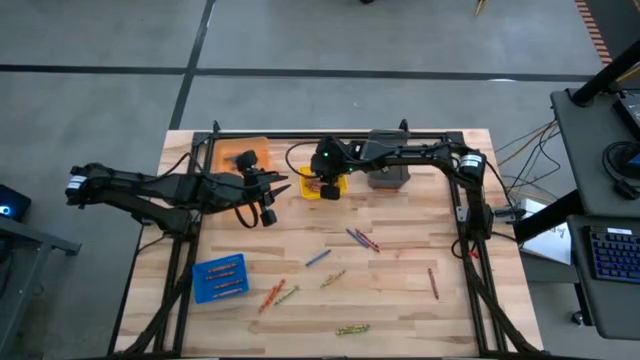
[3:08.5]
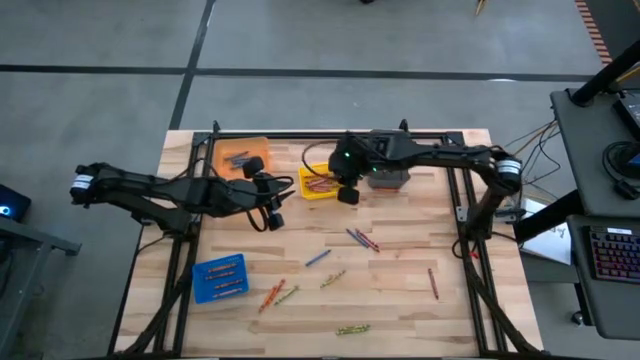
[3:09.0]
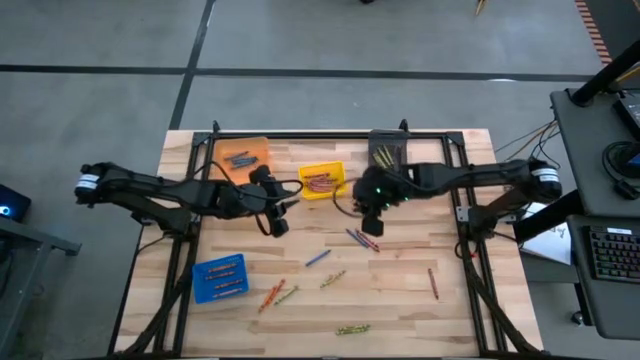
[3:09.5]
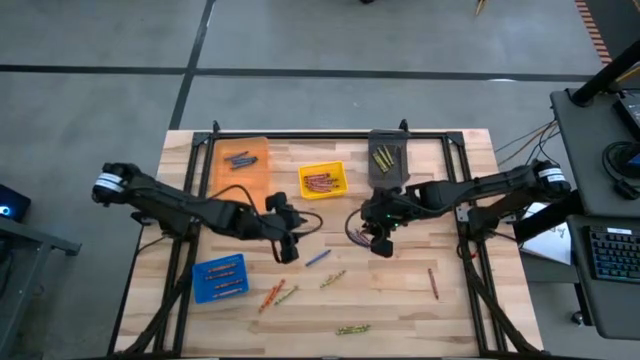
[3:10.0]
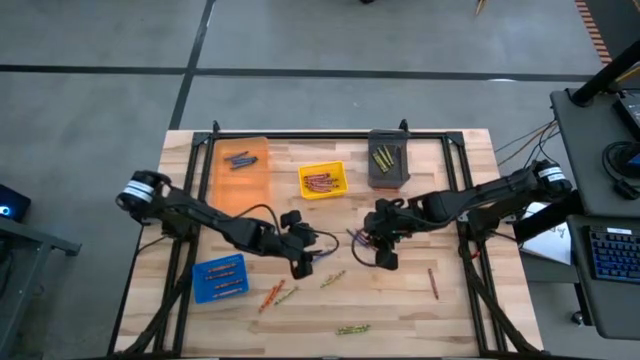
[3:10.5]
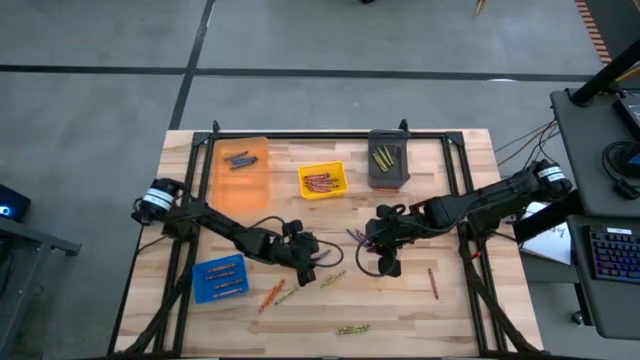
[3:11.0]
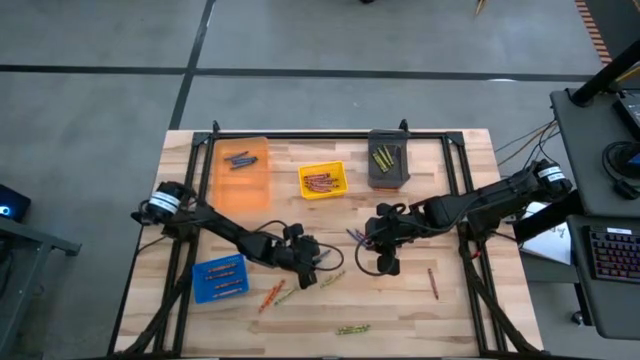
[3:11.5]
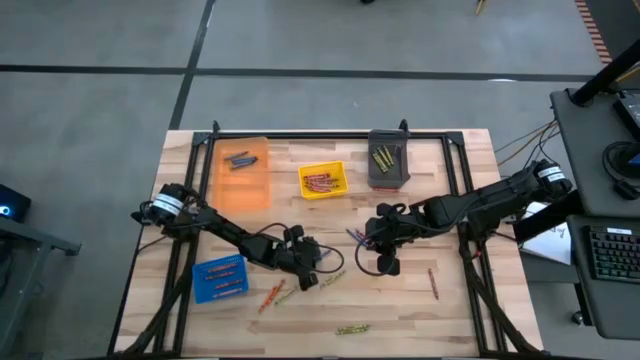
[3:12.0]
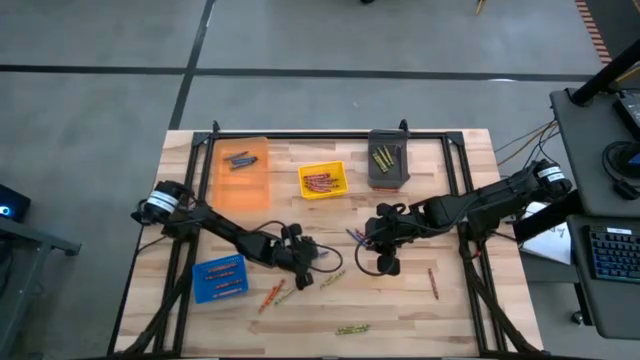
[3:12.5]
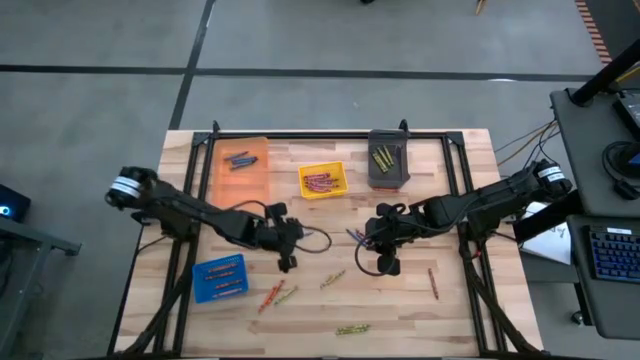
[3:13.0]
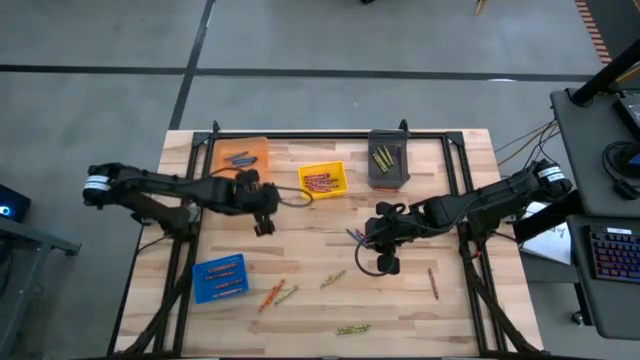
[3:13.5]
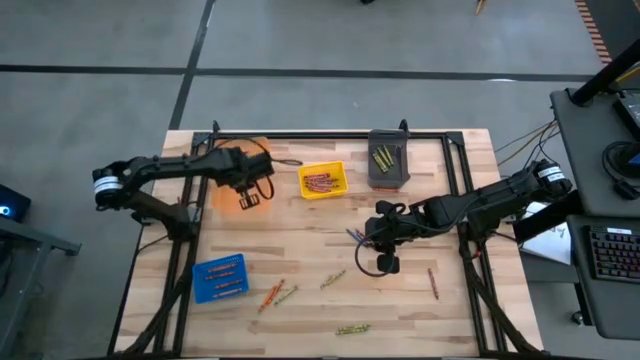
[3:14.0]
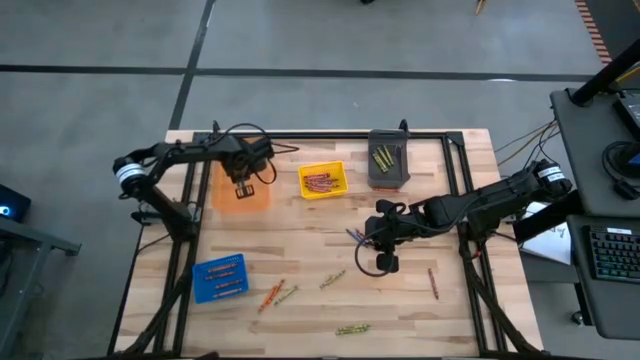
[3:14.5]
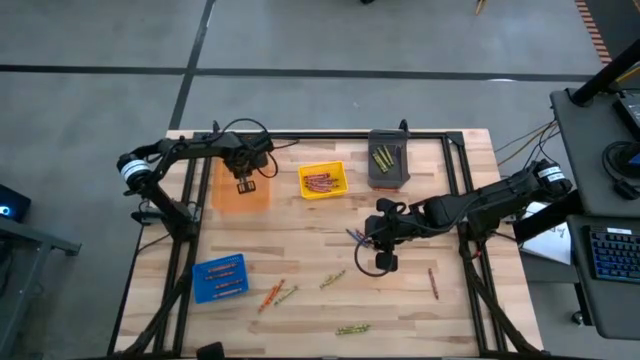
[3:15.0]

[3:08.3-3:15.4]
Task: Sort crayons
Put the blue crayon into the orange bin

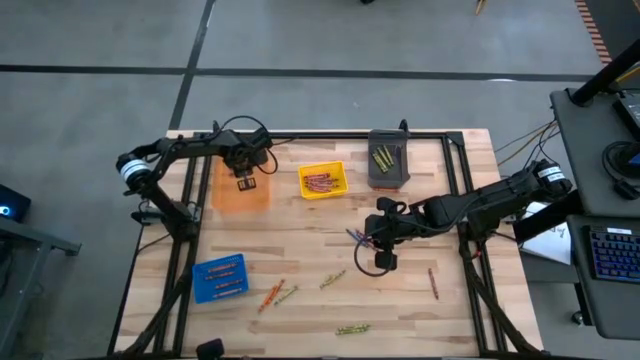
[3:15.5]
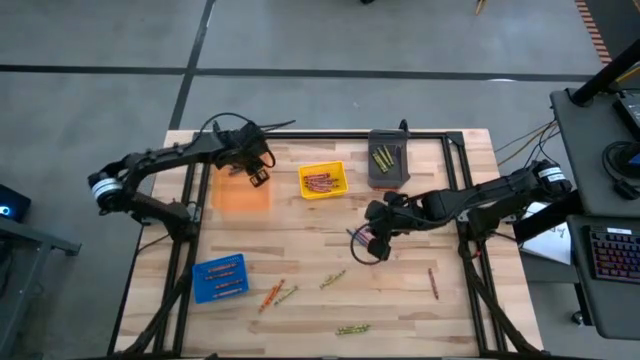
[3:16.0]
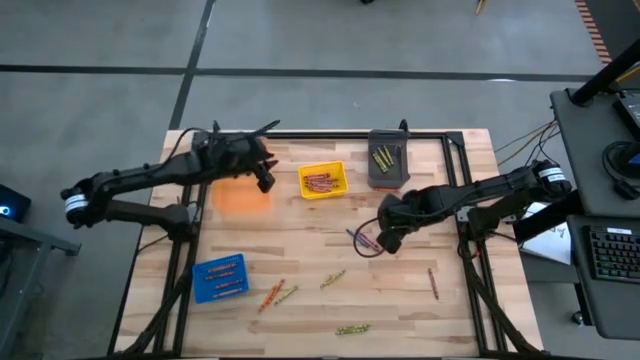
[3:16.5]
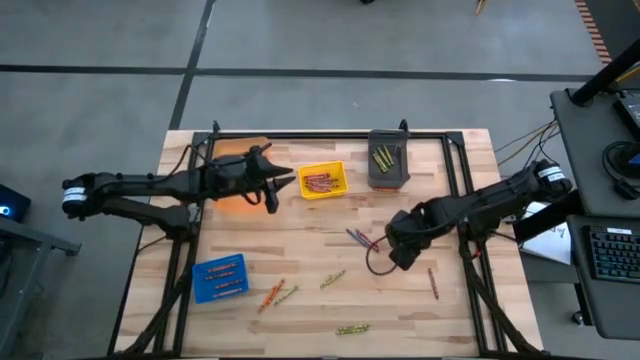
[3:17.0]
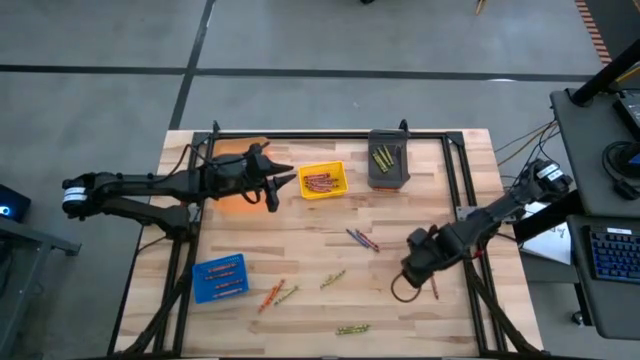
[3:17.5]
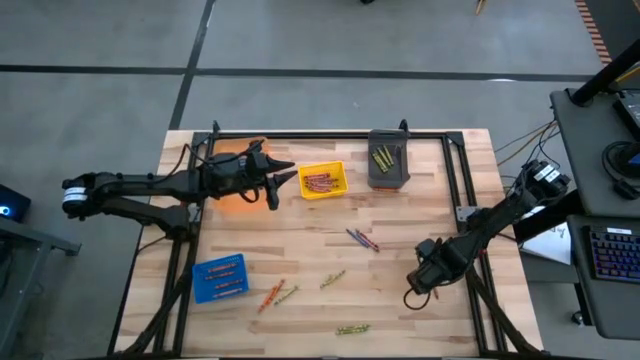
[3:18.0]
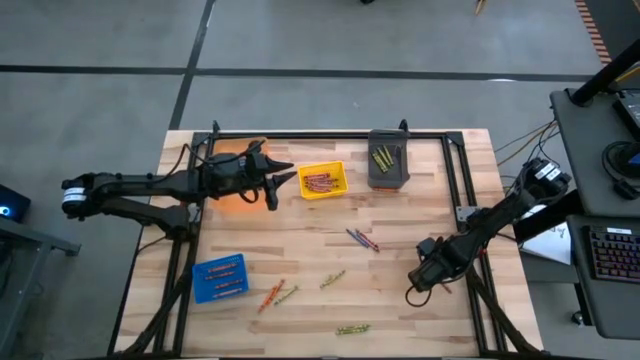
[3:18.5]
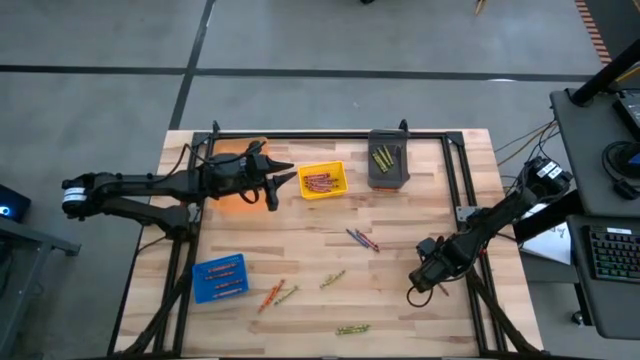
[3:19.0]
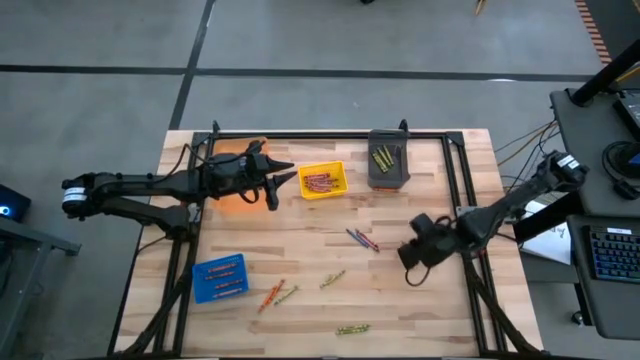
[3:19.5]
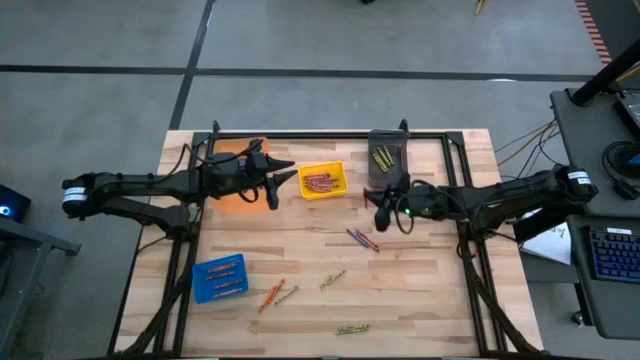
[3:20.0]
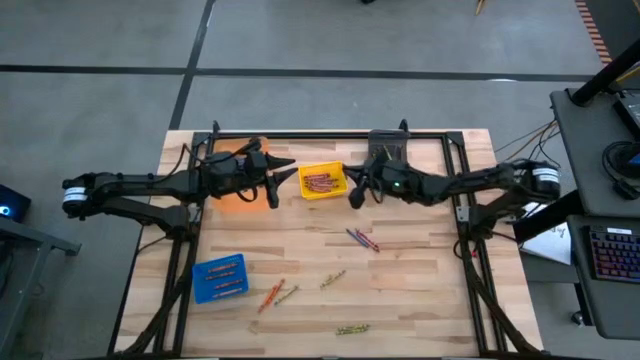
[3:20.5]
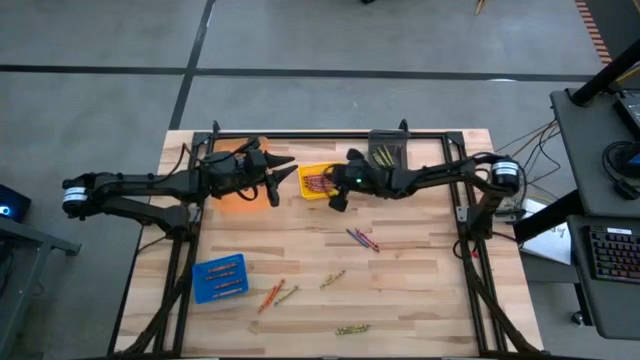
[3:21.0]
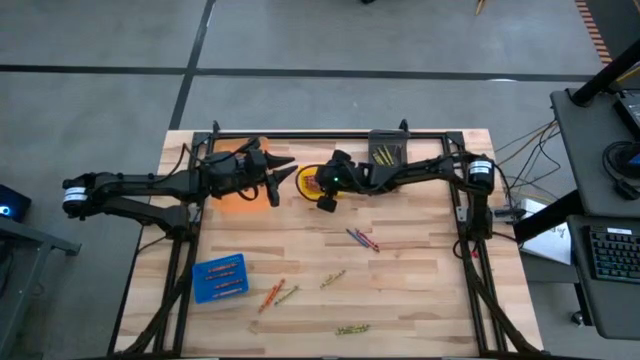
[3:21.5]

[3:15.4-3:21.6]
Put the red crayon into the yellow bin

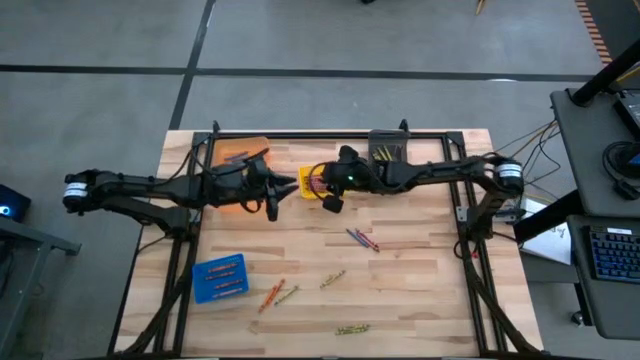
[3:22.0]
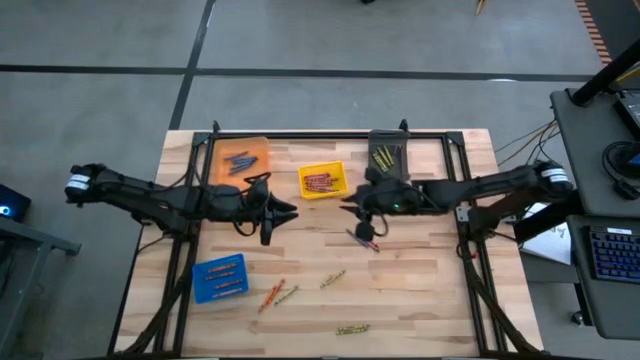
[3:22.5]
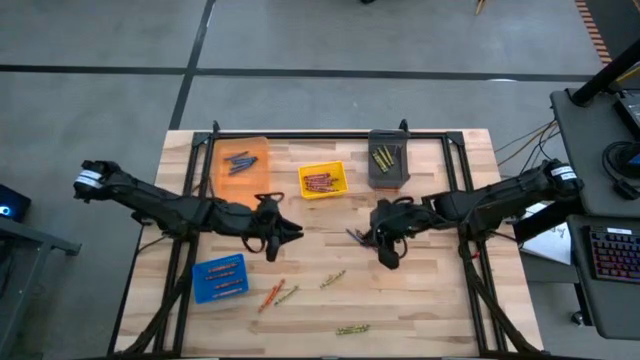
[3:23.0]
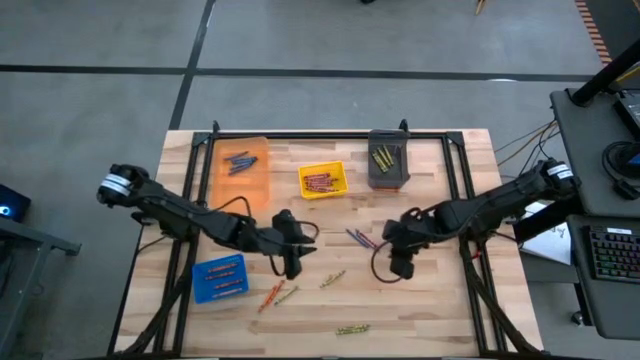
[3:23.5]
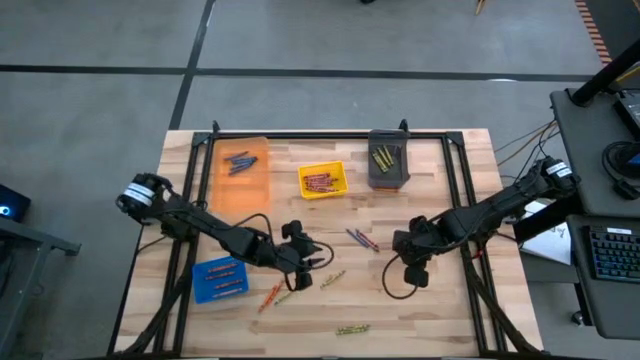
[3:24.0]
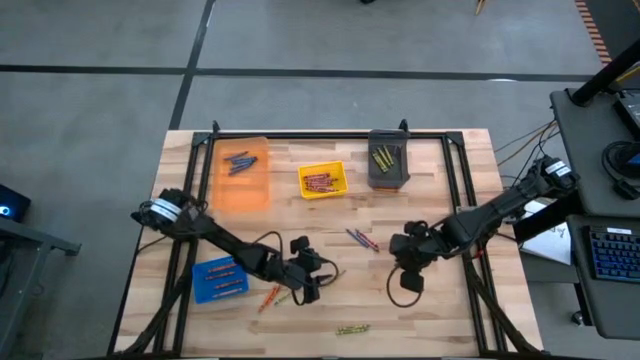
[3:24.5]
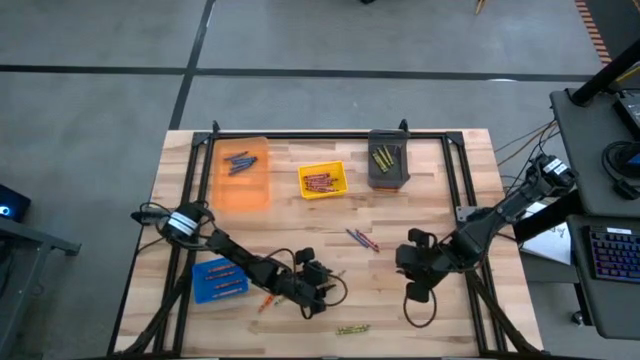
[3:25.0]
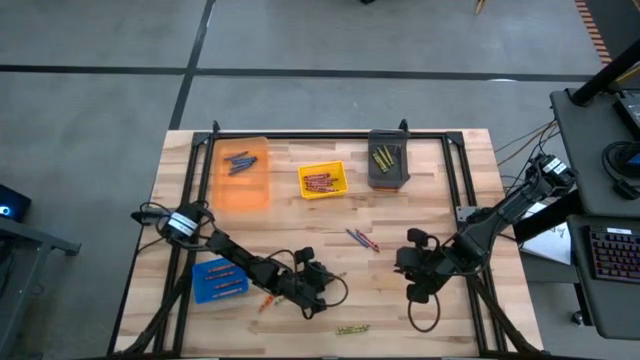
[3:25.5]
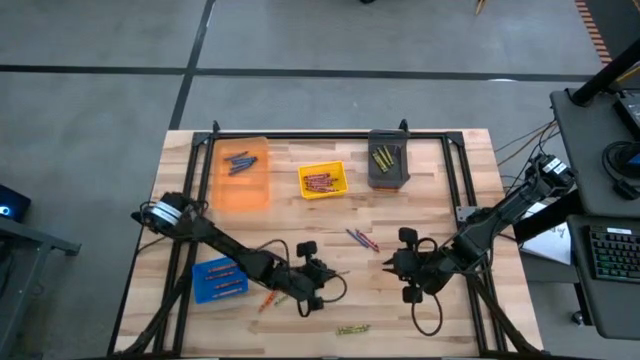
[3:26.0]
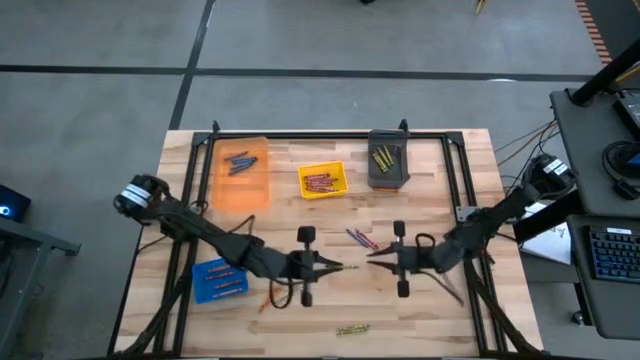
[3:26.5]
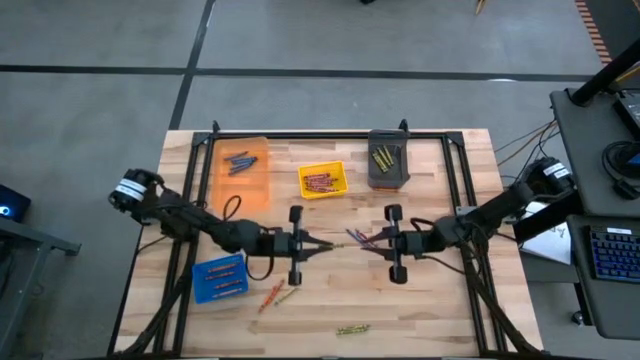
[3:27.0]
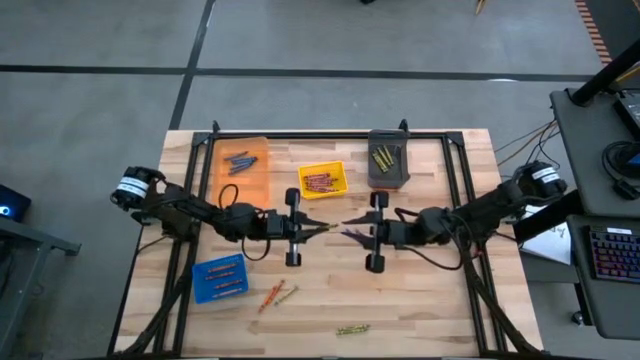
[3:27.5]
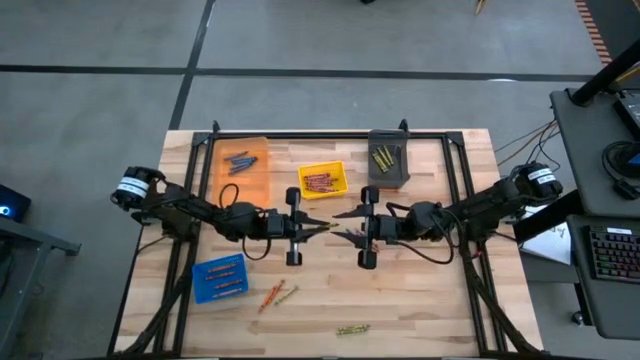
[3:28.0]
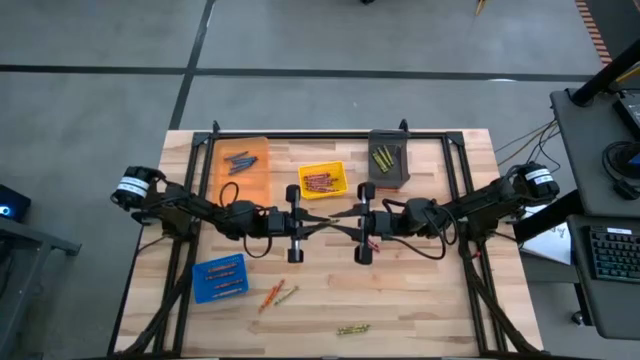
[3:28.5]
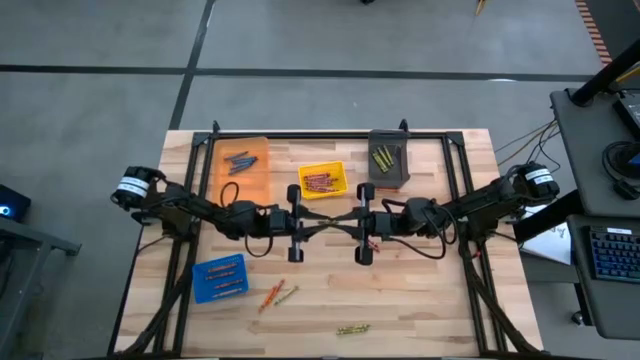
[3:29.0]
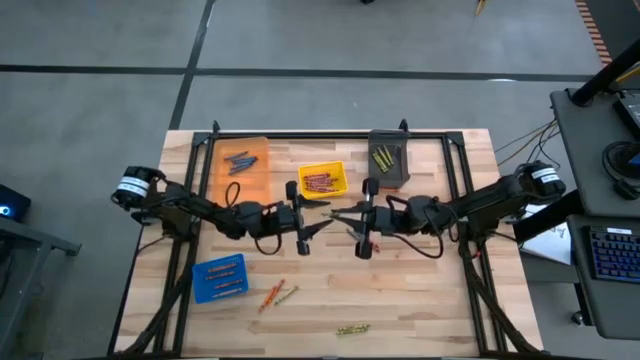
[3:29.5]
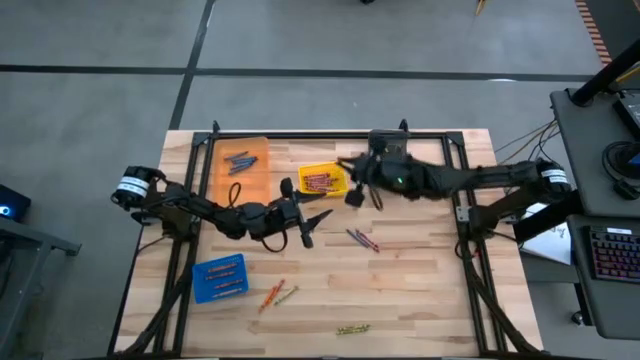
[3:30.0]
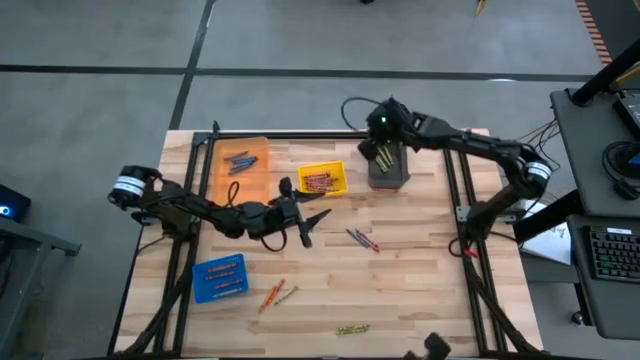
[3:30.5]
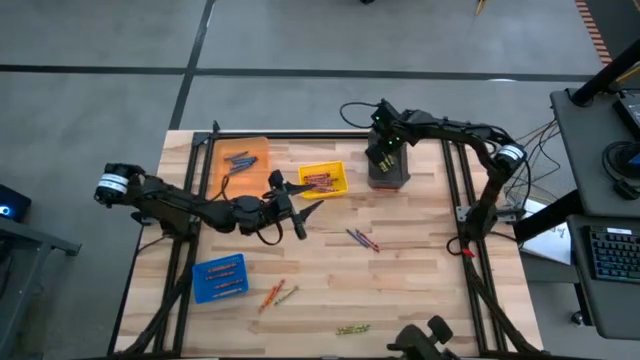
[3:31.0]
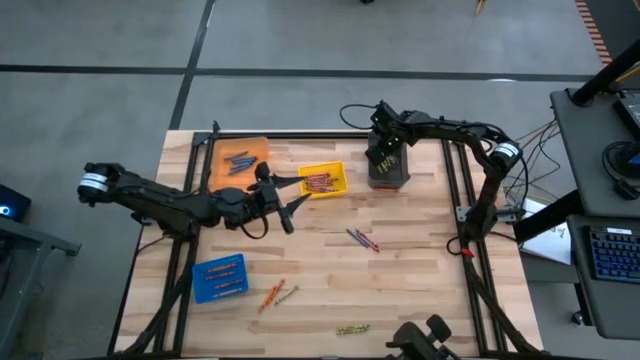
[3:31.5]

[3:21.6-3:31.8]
Put the green crayon into the black bin
